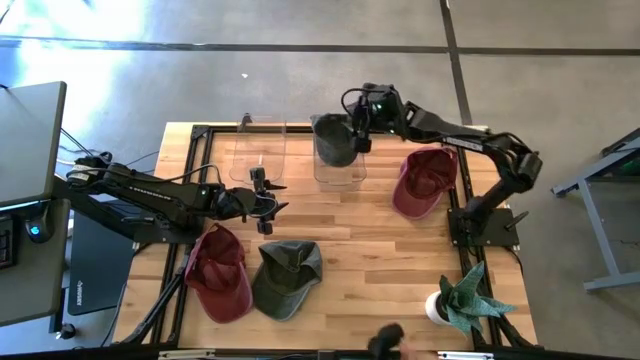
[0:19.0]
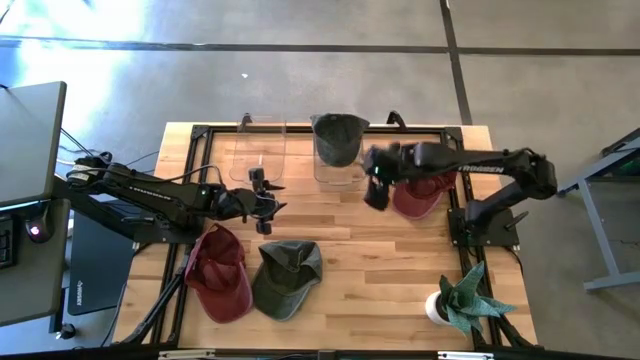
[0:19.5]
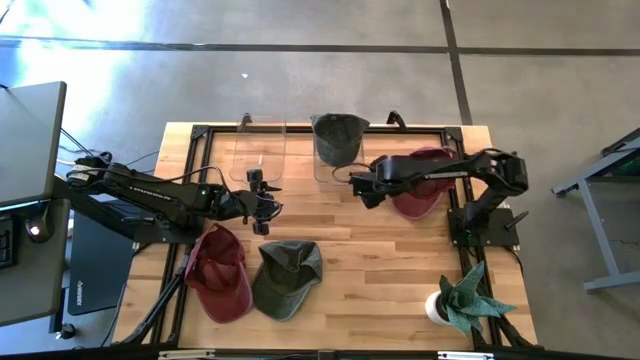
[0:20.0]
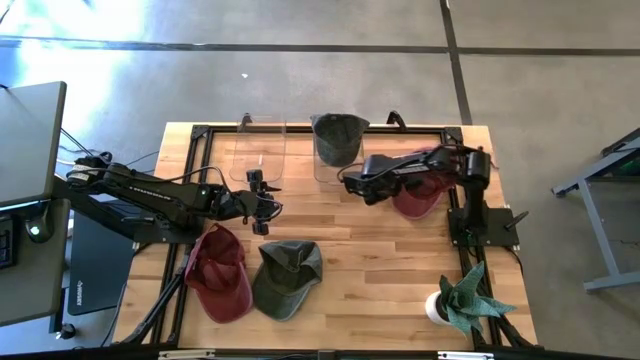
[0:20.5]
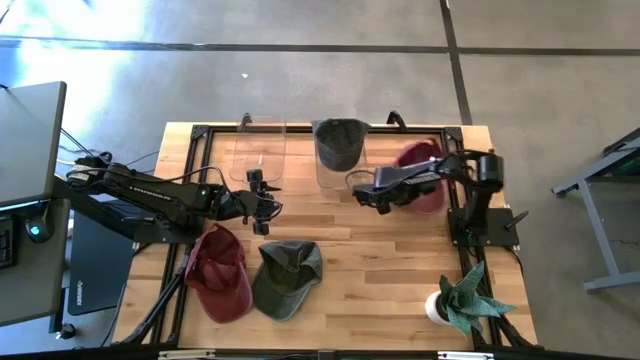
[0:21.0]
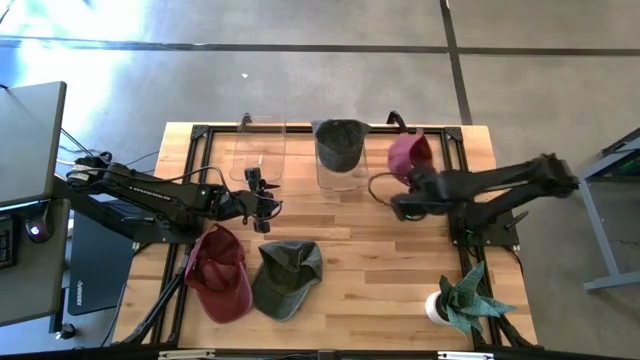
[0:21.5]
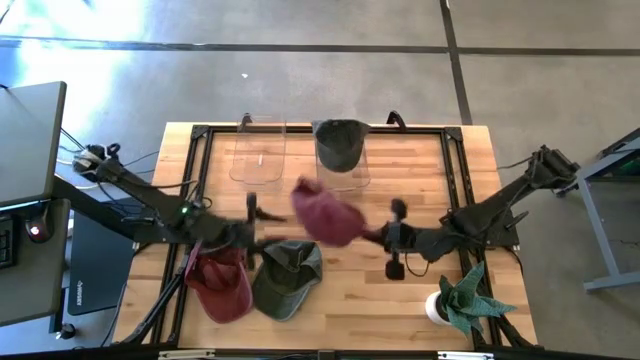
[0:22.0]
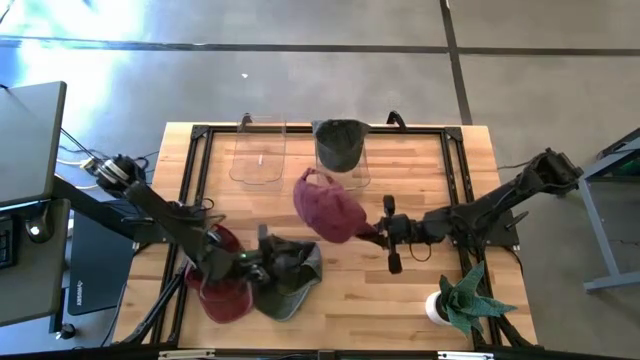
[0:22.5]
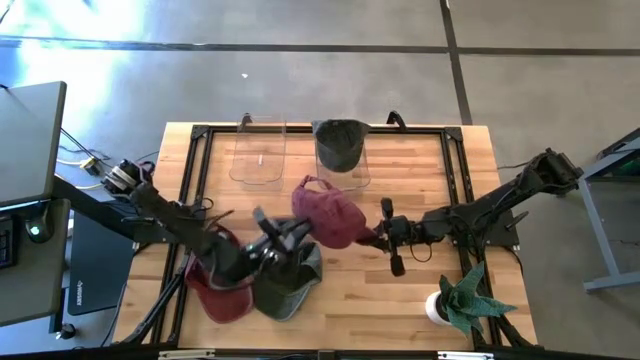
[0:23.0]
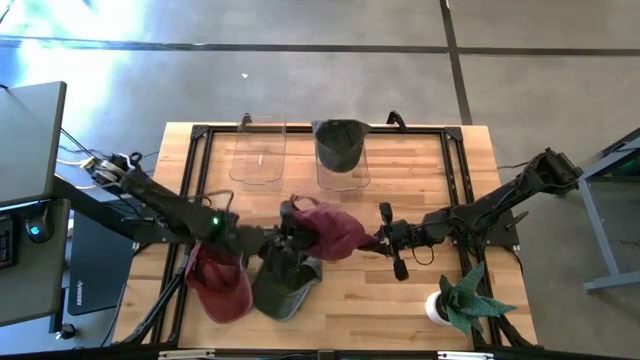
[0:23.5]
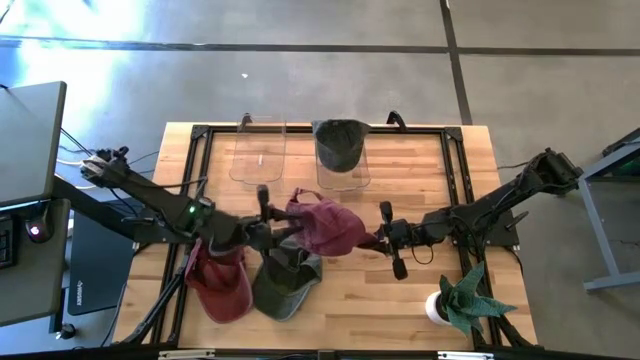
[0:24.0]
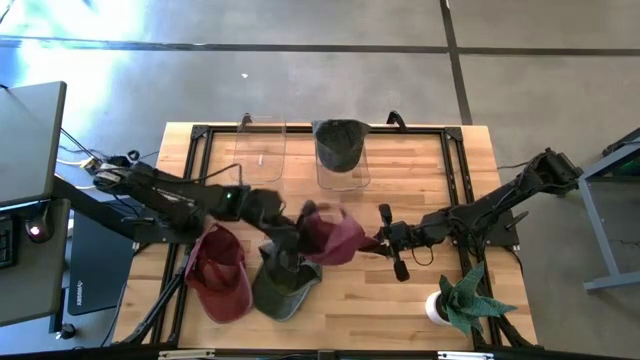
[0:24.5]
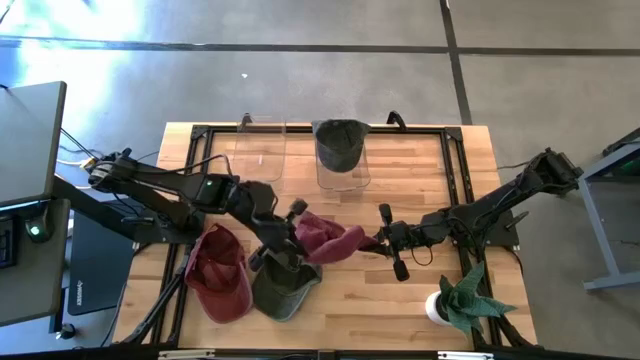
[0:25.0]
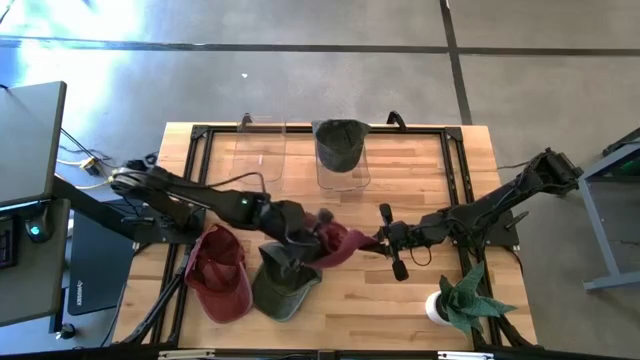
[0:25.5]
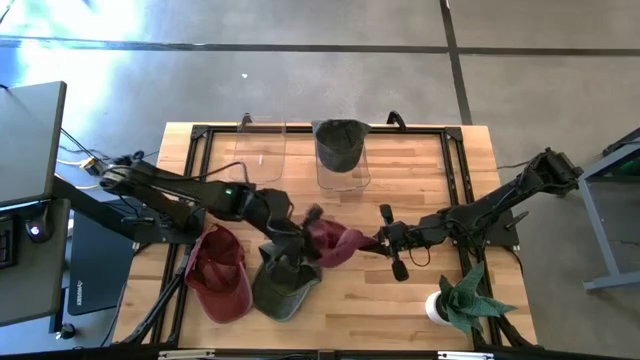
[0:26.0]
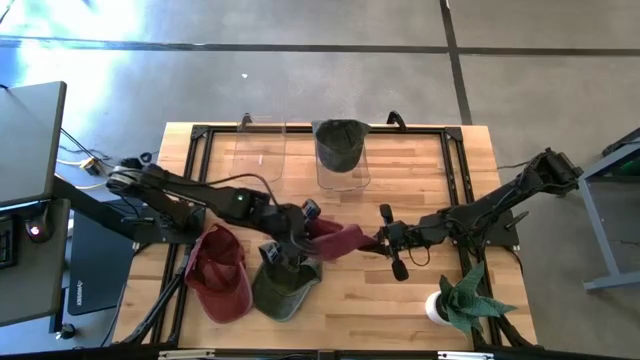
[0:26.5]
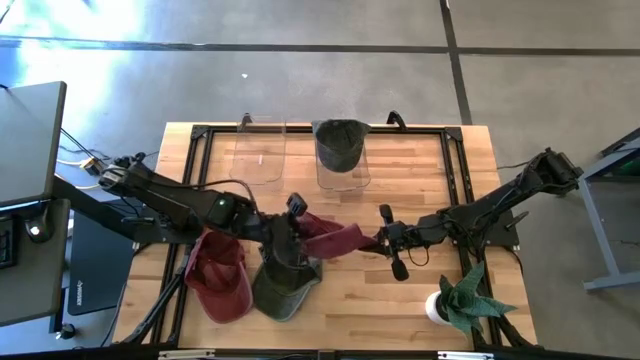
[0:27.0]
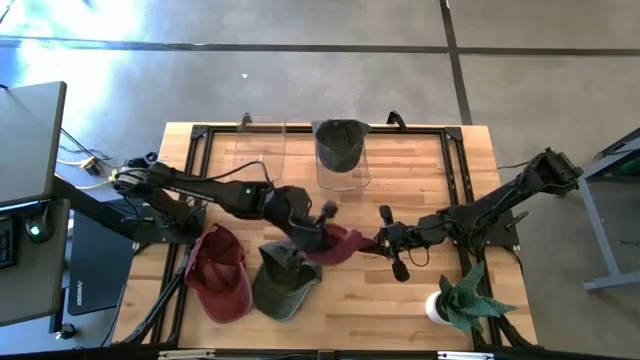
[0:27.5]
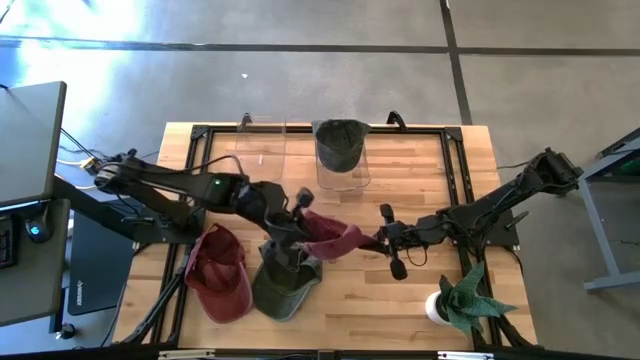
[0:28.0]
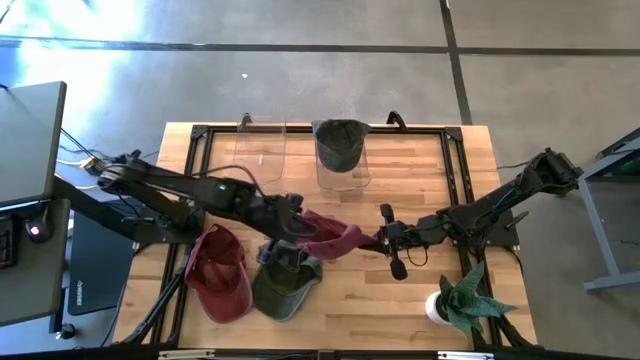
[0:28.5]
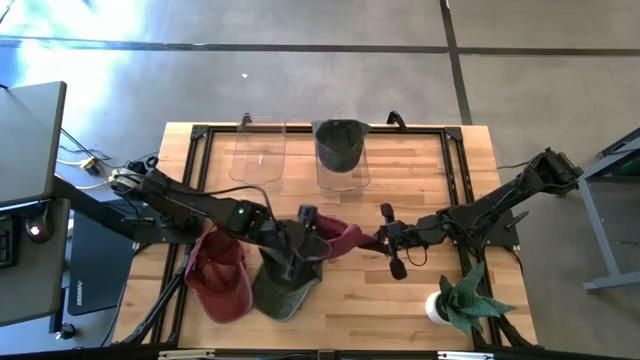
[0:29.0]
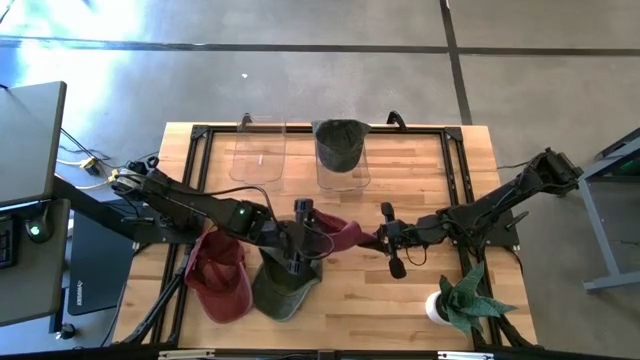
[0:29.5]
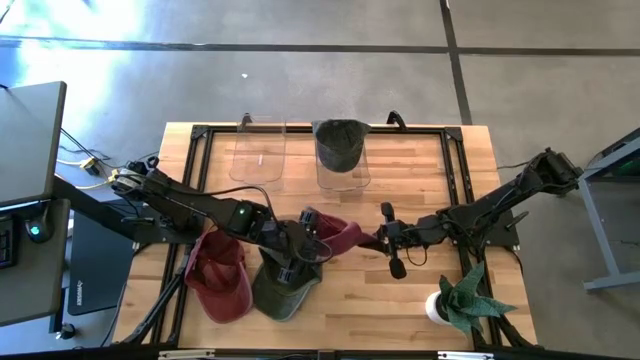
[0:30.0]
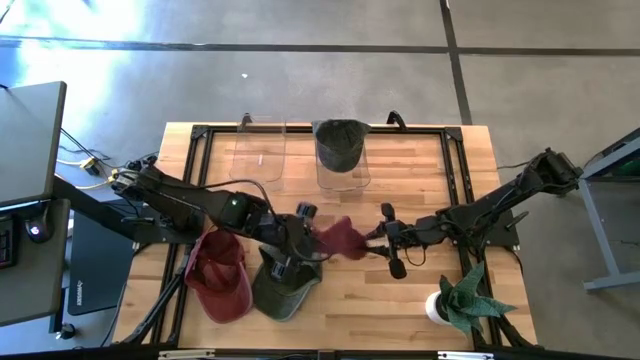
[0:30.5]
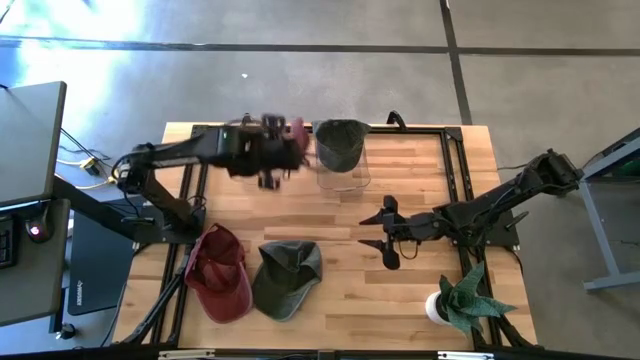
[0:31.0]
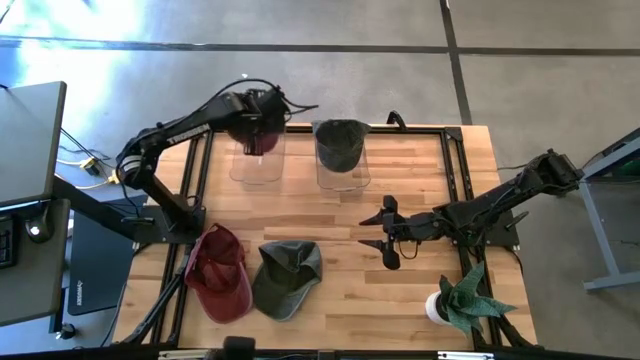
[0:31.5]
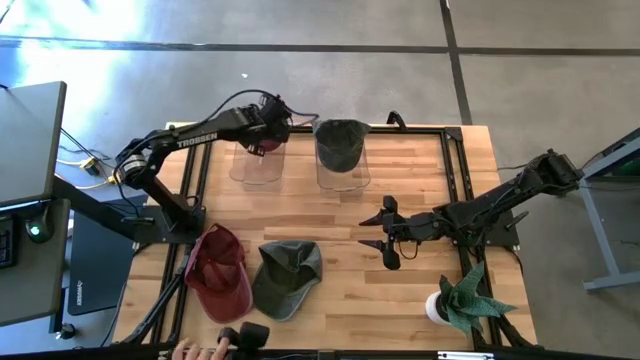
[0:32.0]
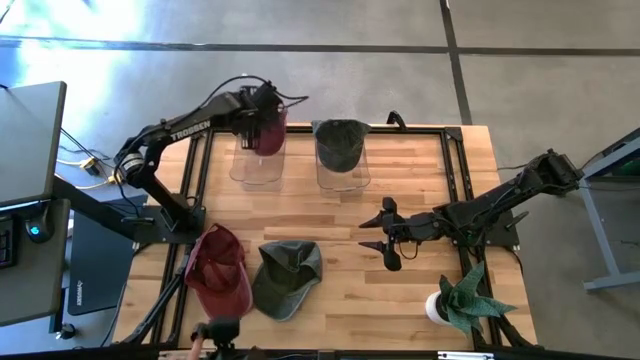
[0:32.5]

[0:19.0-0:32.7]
Task: Pick & Place hat
Put the top red cap into the left transparent bin

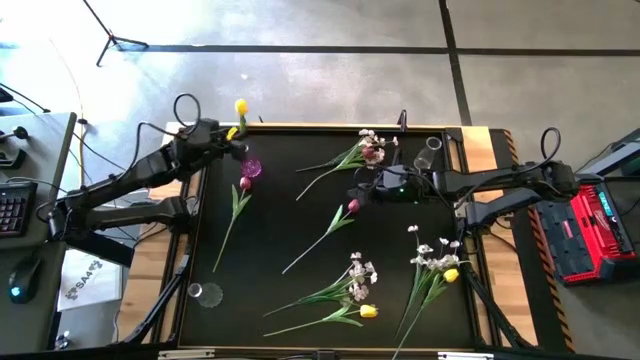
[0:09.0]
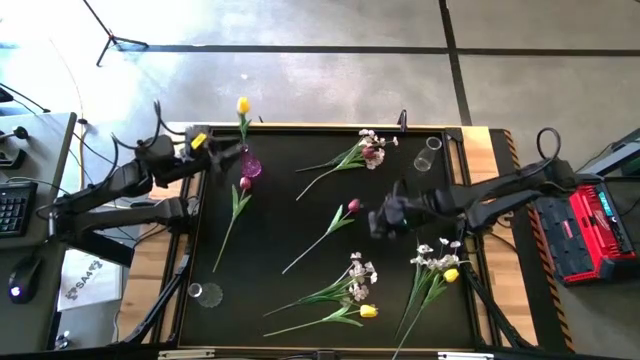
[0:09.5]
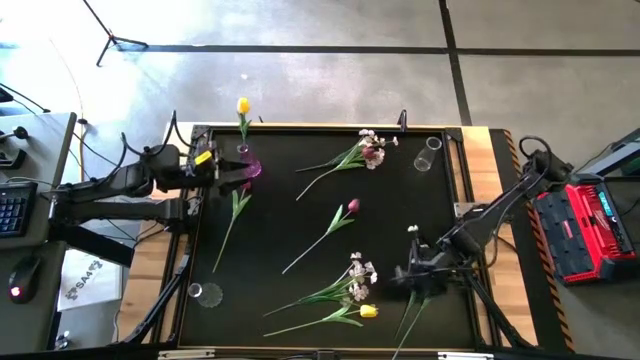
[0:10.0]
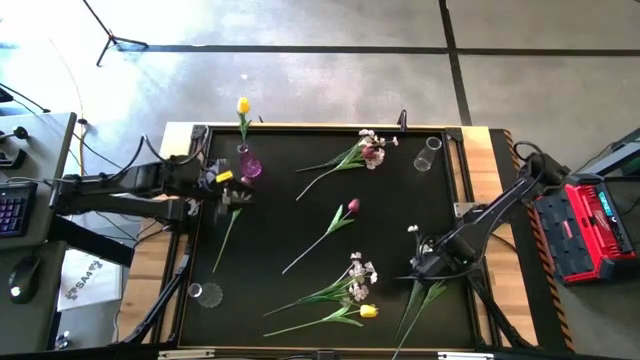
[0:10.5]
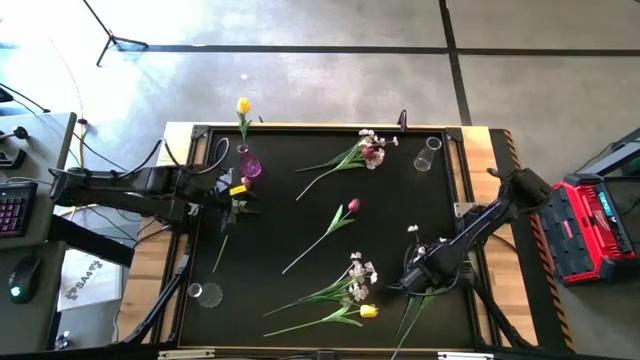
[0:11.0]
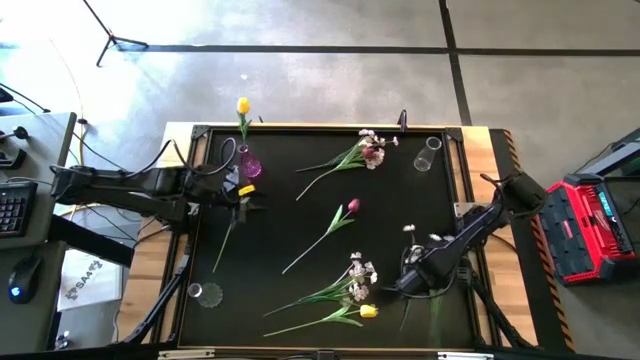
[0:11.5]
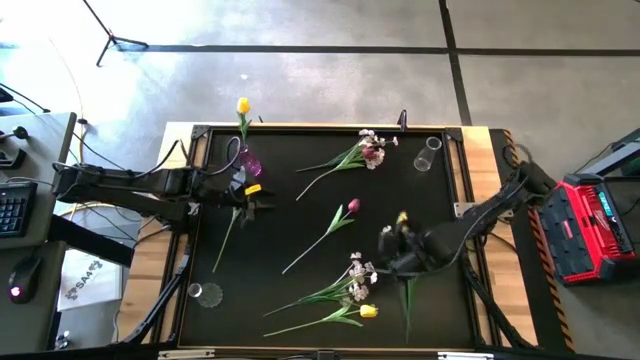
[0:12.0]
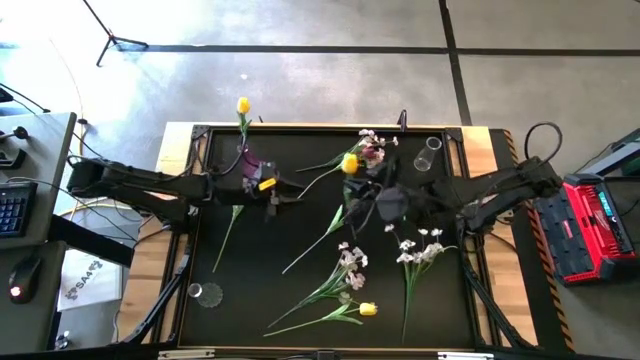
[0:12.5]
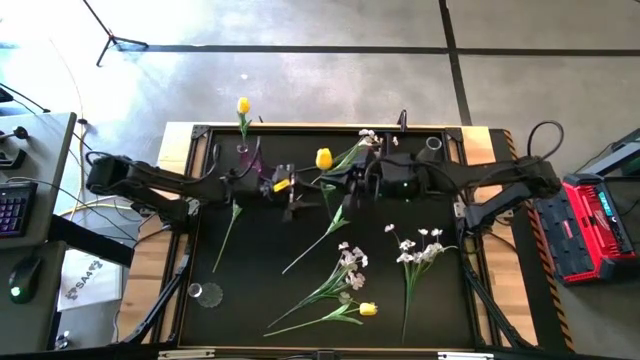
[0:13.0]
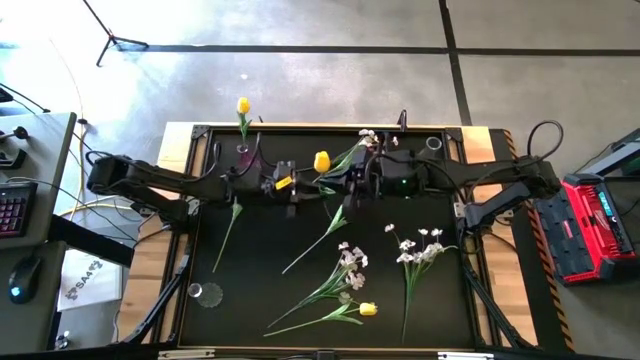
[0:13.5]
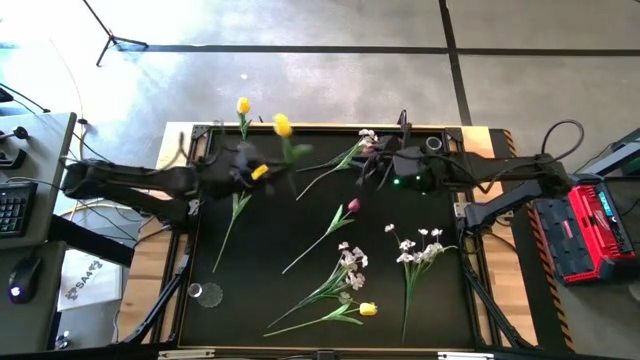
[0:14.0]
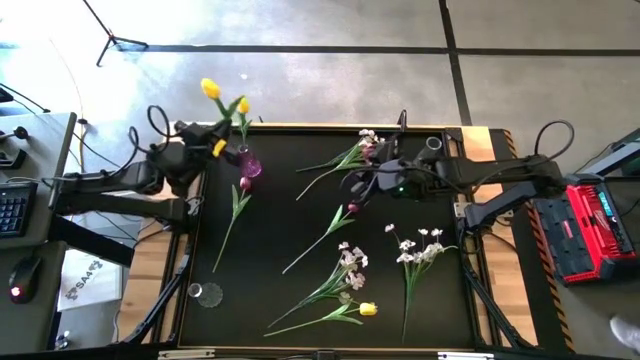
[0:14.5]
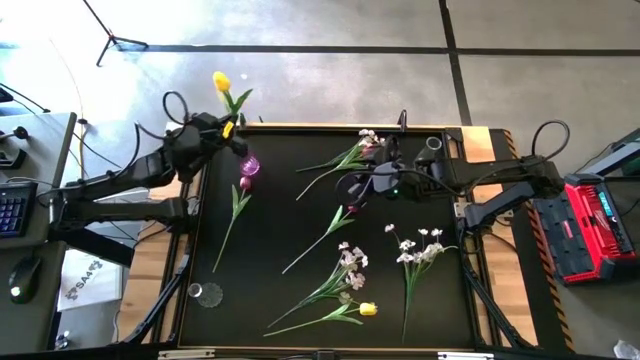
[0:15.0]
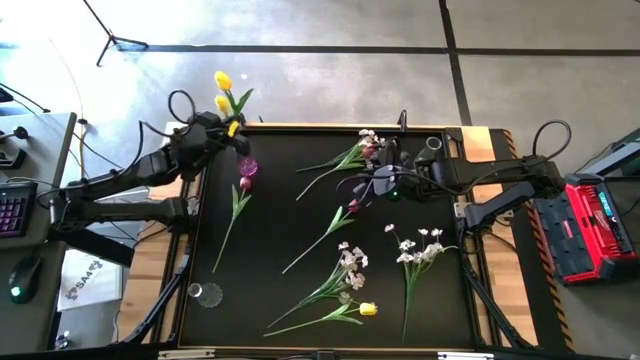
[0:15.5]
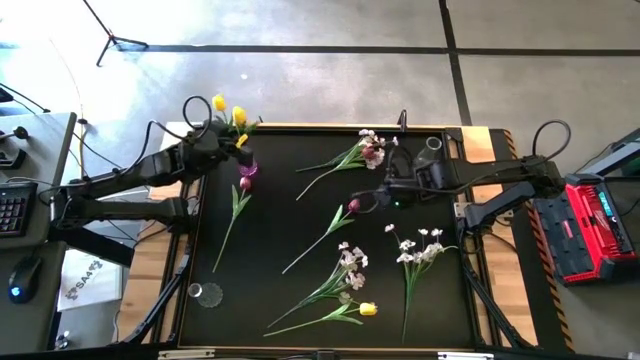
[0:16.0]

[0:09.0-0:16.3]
Task: Sort flowers into vase by color
Put the right yellow flower into the violet vase
